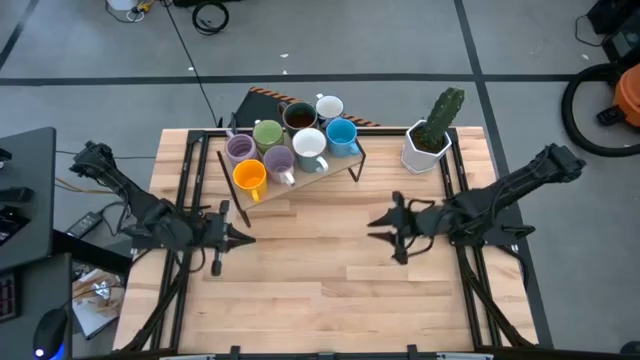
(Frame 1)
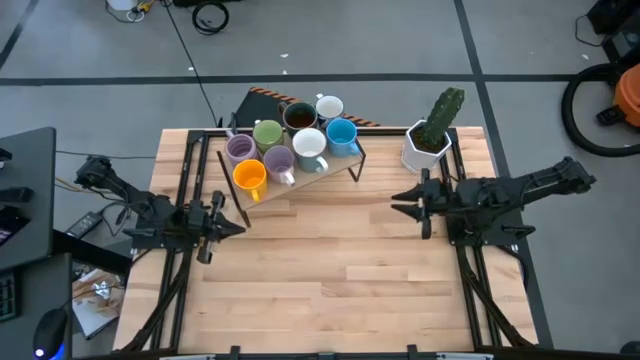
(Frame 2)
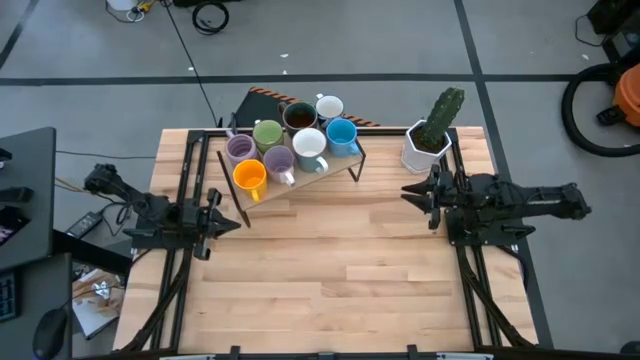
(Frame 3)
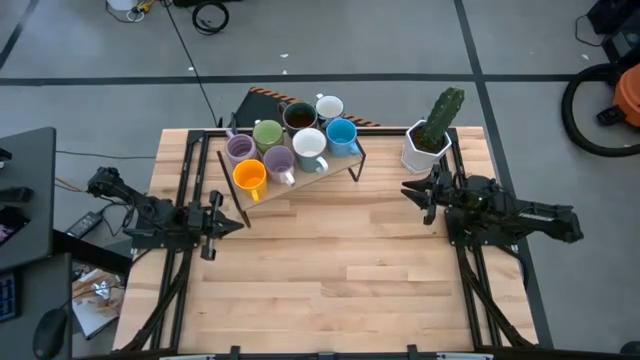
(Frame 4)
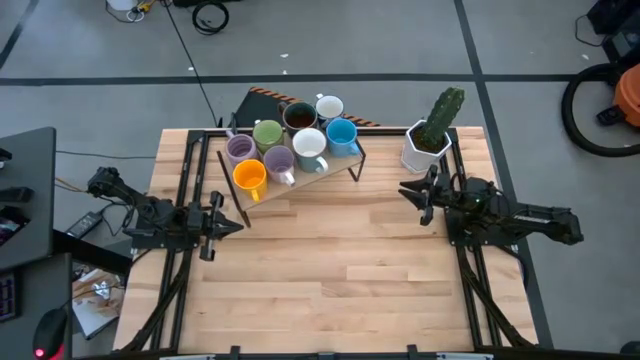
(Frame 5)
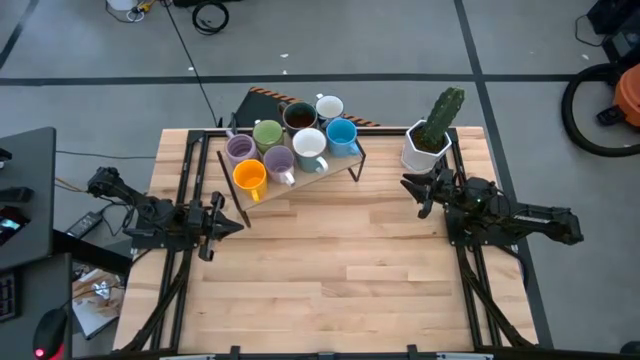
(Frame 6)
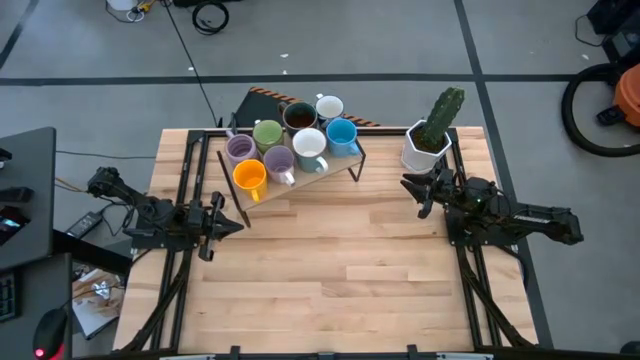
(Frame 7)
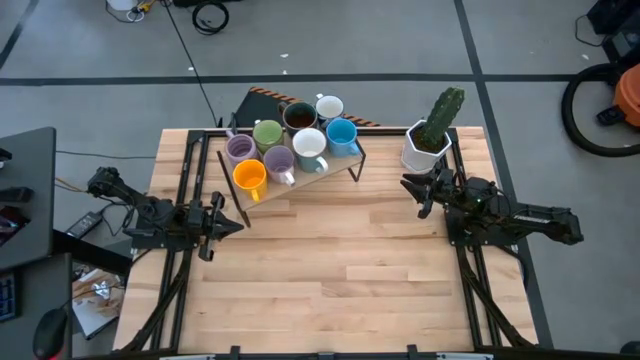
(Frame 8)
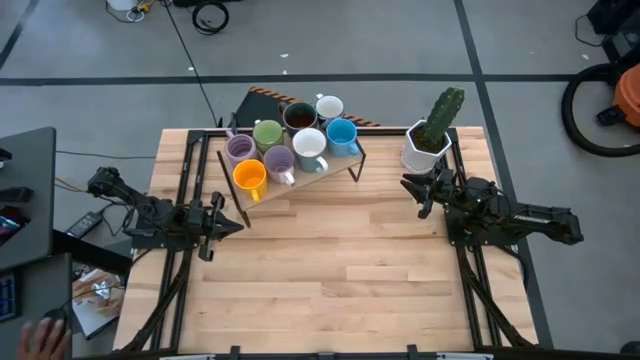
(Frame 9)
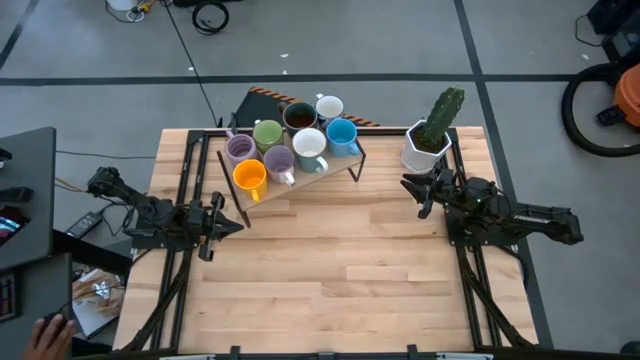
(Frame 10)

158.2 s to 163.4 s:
Task: Place coffee mugs
Return to Home Position

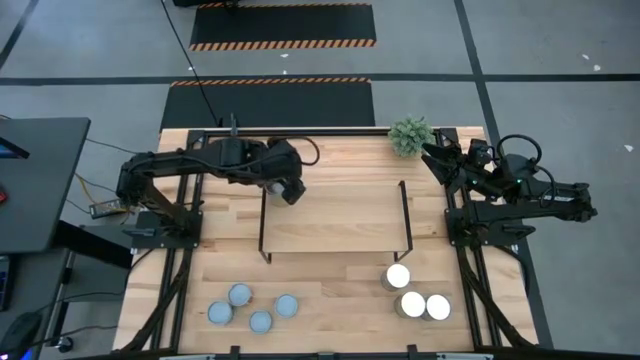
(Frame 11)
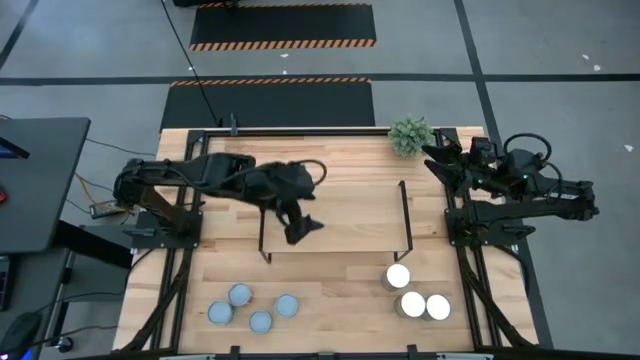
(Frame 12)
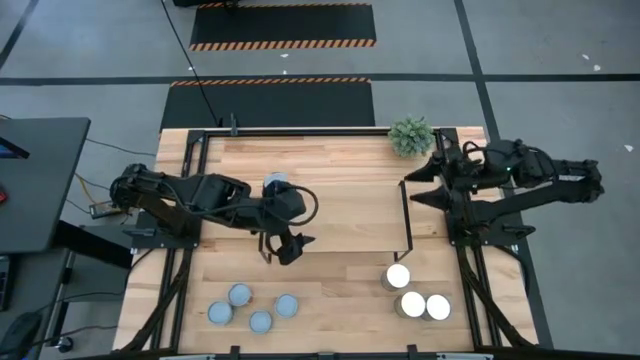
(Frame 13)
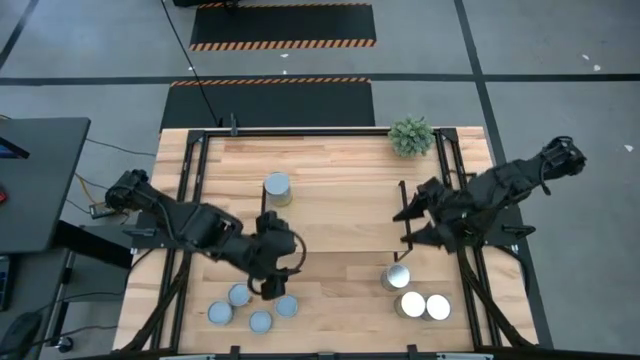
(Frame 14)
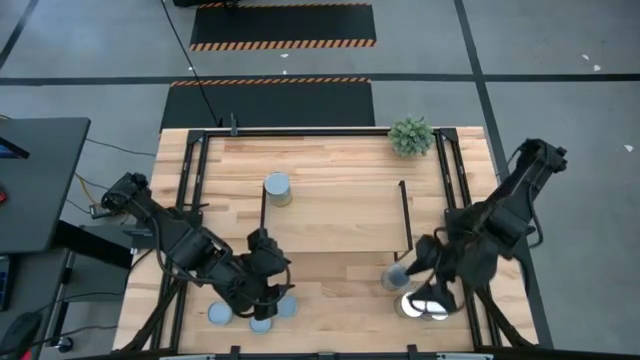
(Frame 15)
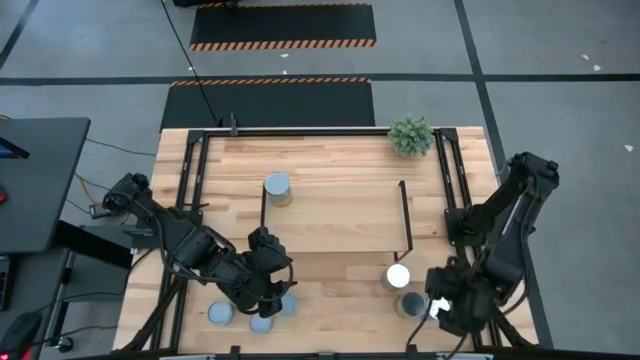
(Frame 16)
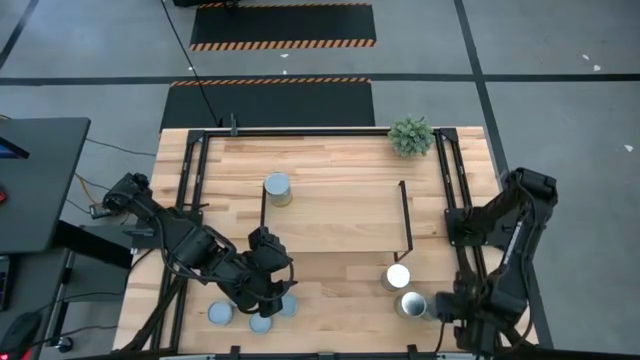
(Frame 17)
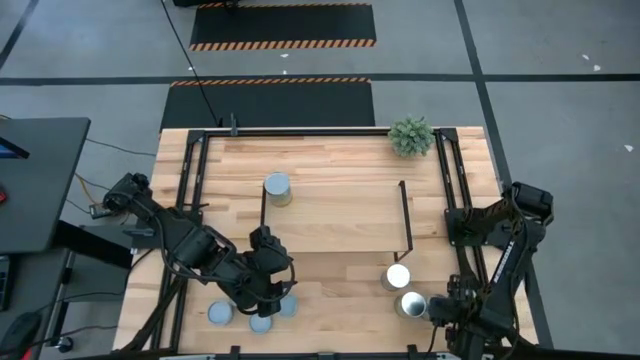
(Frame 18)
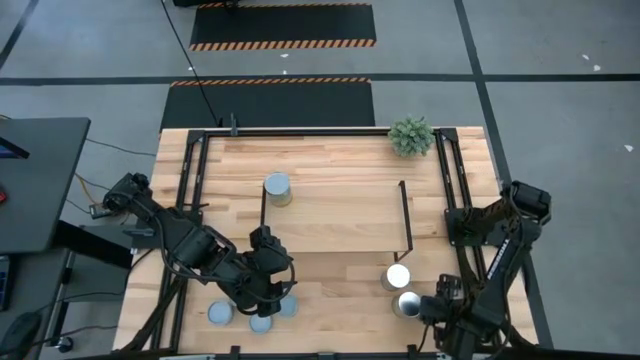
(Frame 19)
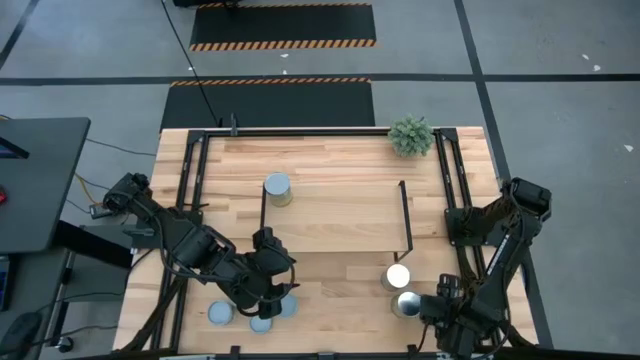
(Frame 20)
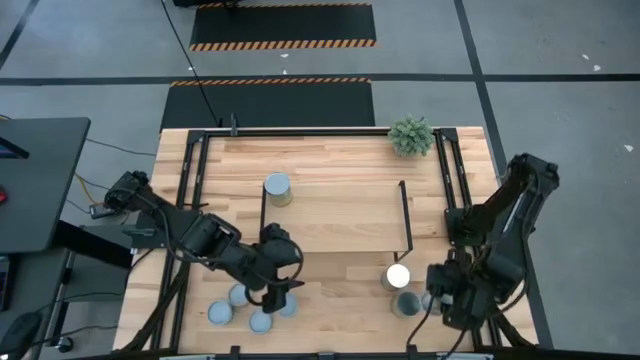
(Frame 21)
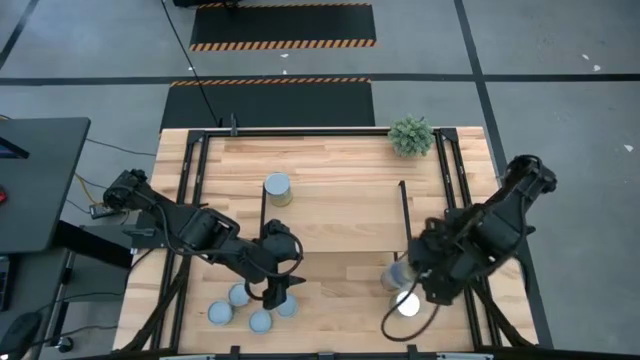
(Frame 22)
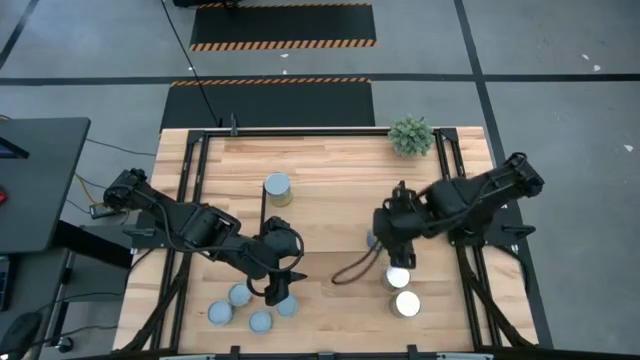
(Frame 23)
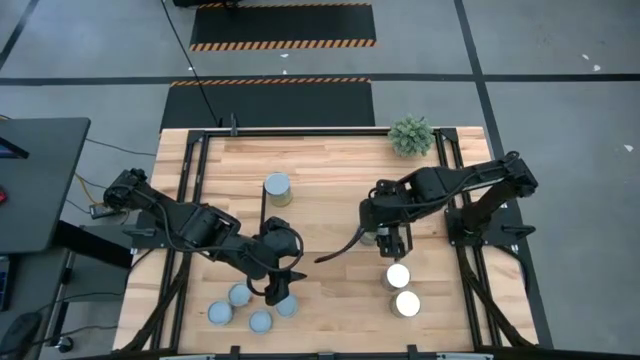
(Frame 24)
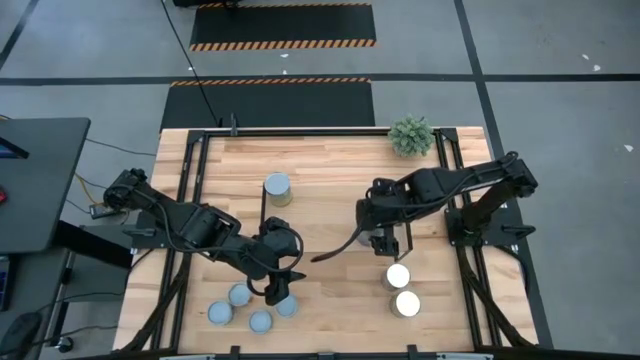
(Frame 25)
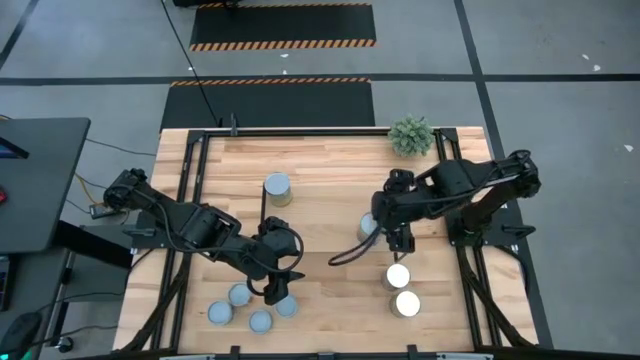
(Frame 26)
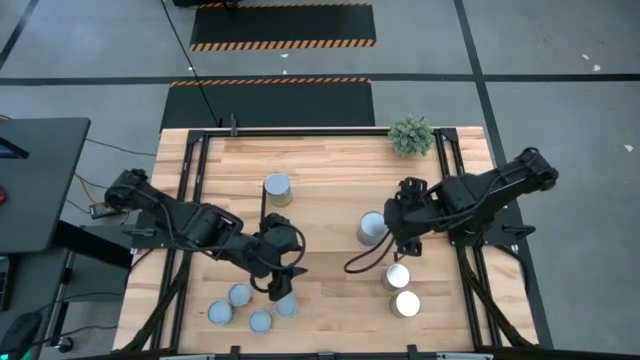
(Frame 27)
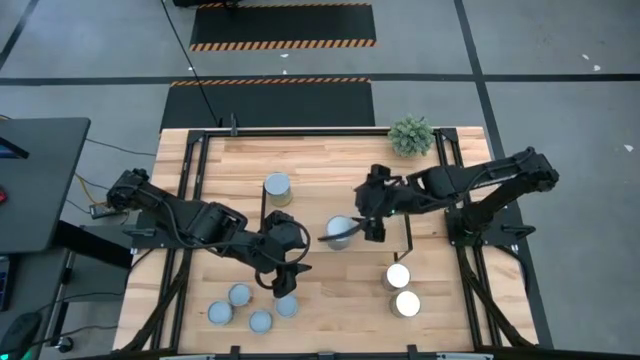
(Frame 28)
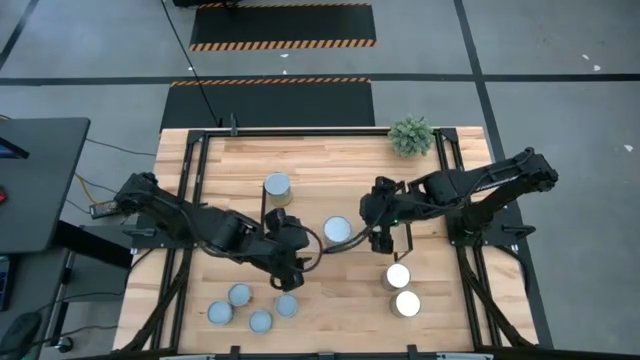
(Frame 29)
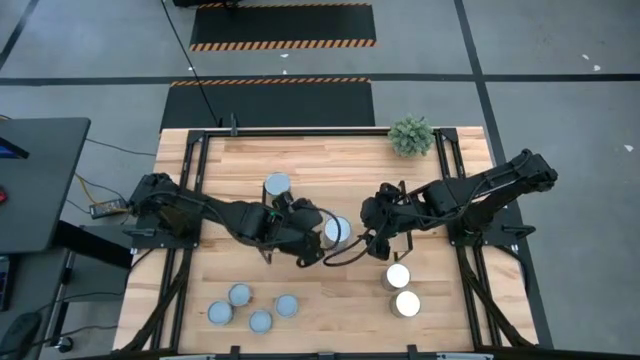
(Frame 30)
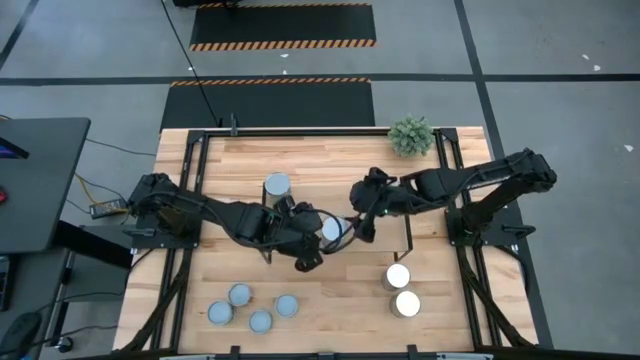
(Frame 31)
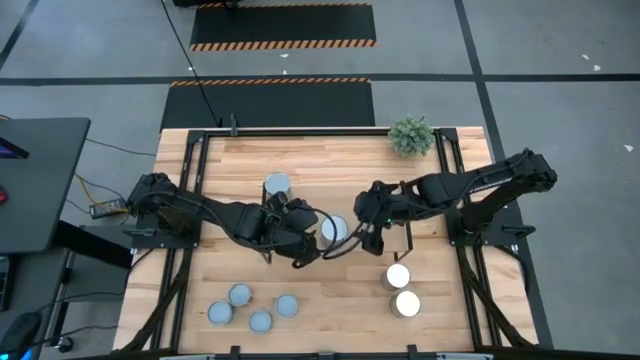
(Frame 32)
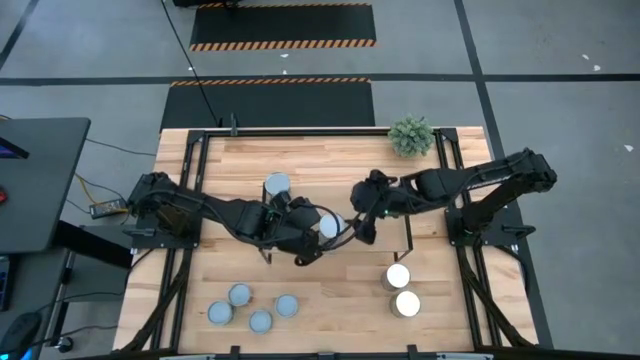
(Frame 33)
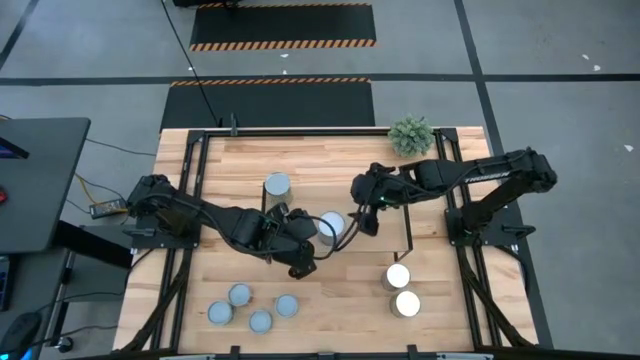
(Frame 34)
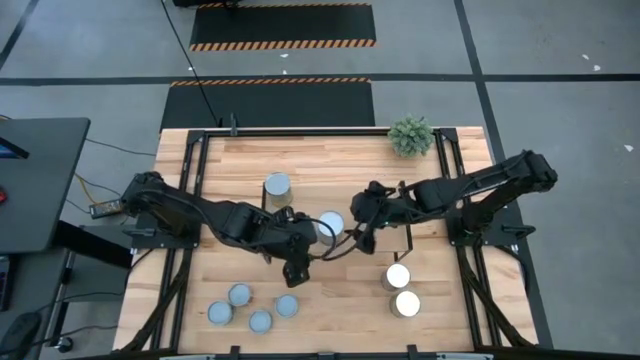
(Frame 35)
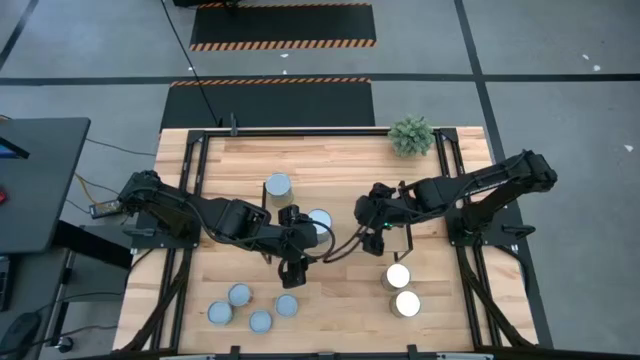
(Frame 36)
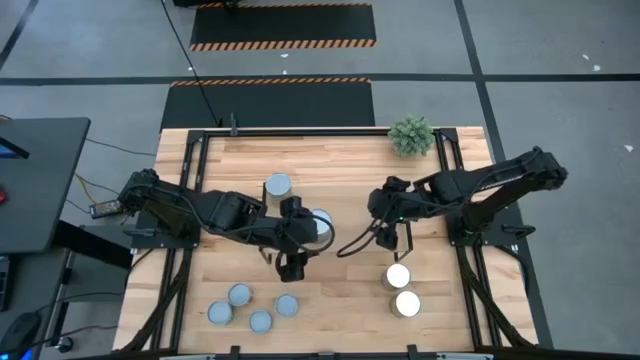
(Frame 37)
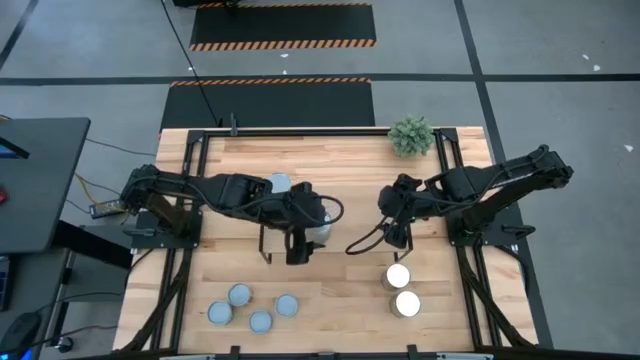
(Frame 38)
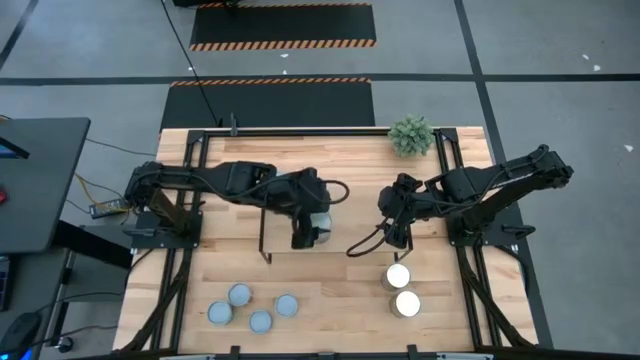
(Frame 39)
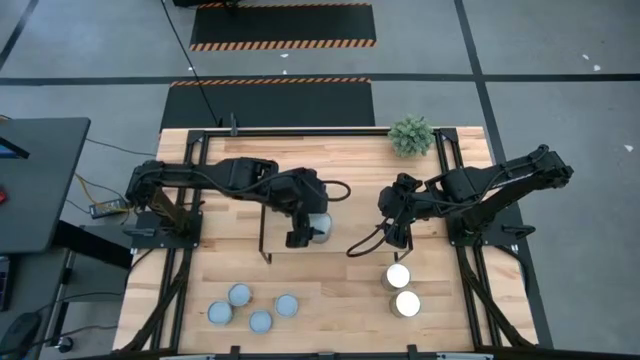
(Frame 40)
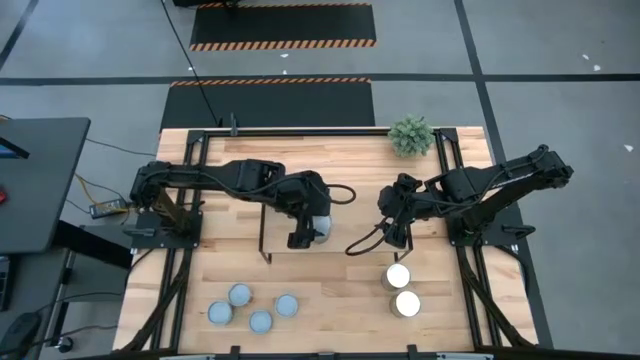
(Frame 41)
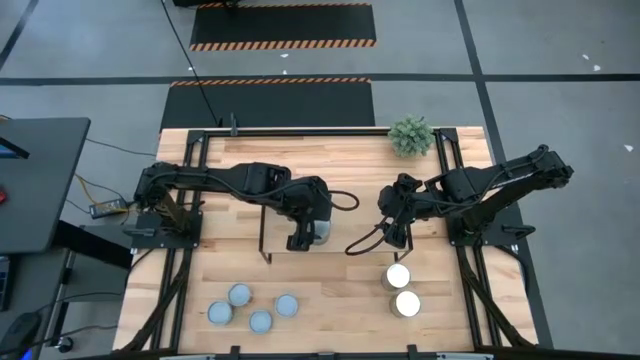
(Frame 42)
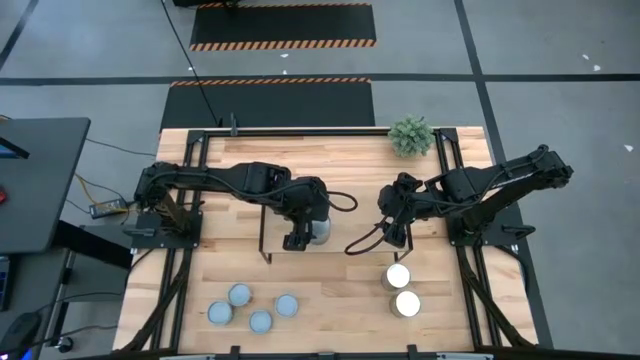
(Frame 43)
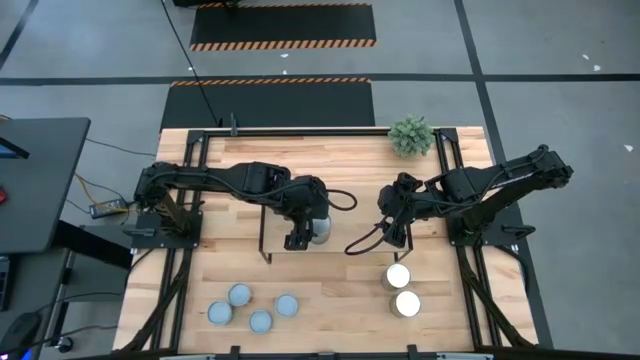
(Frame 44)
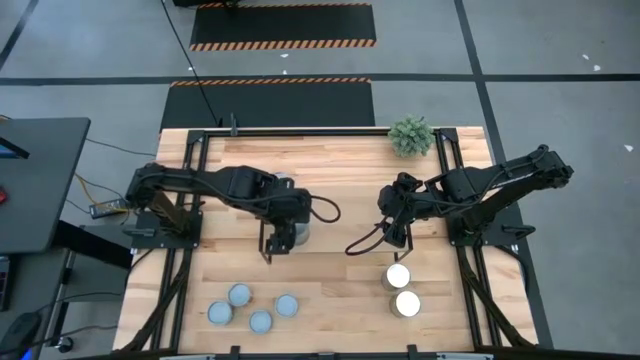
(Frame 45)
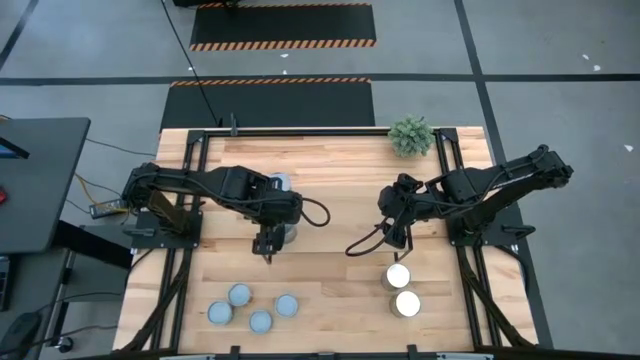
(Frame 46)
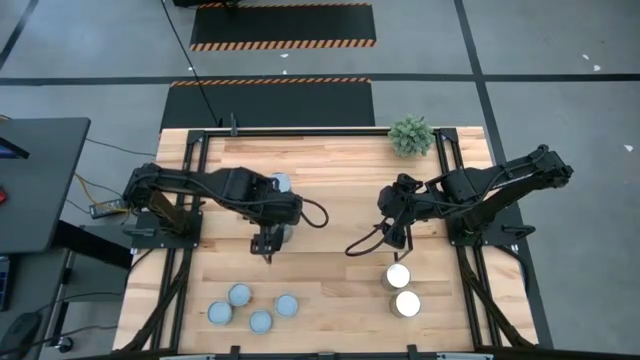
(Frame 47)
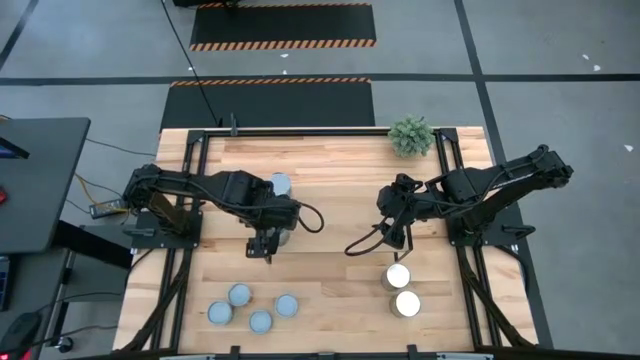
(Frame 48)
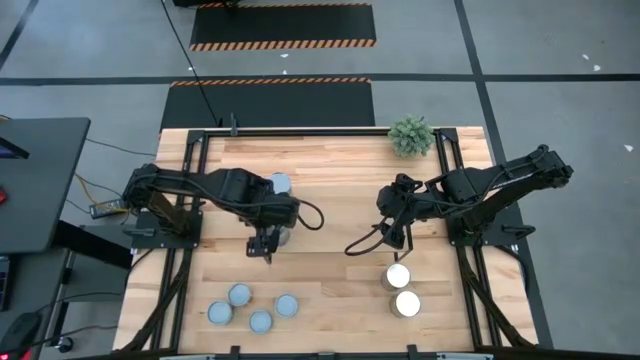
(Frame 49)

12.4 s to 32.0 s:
Task: Pick and place cans onto a shelf
Put the canned peas on the shelf
